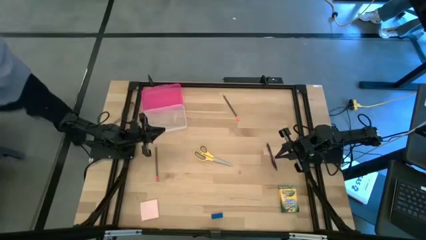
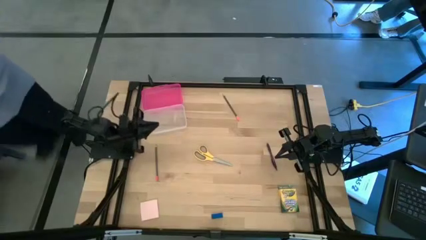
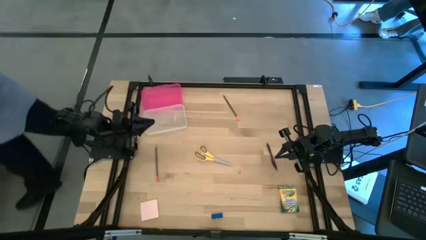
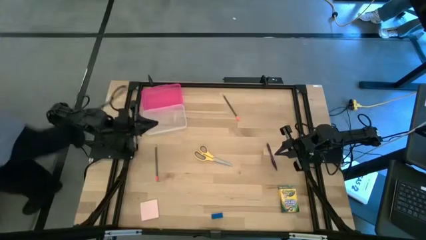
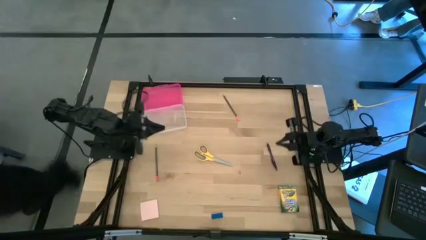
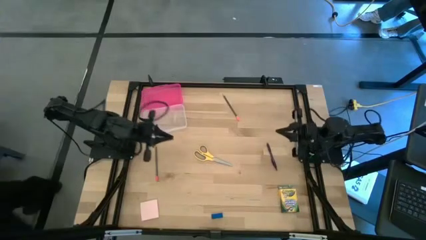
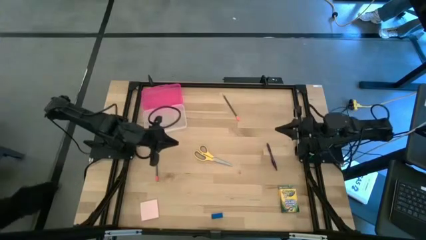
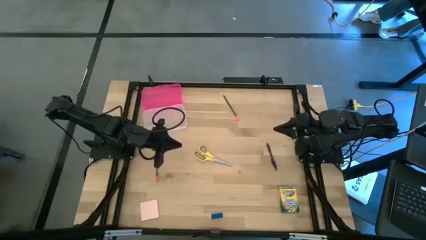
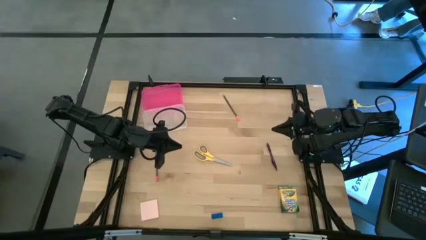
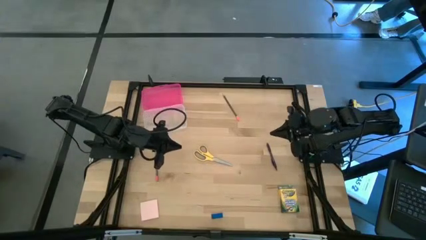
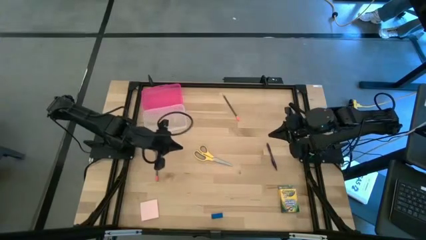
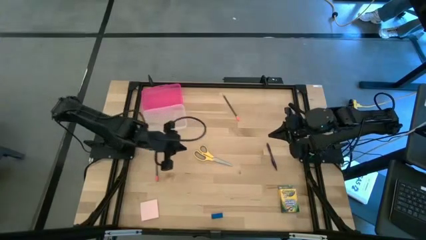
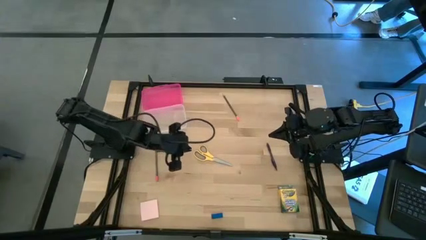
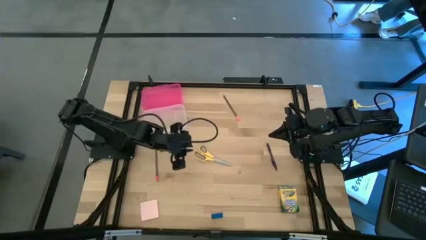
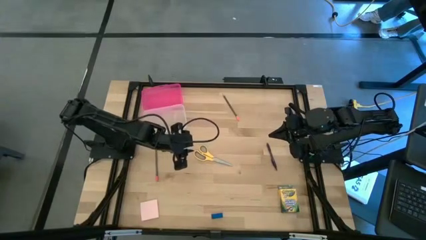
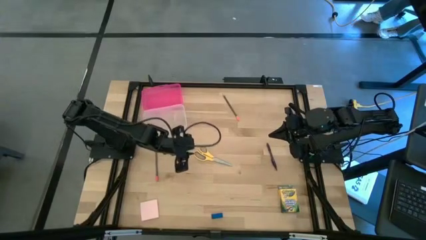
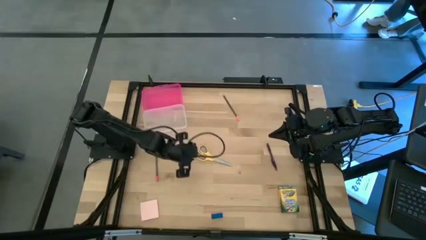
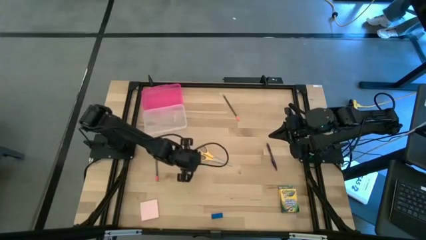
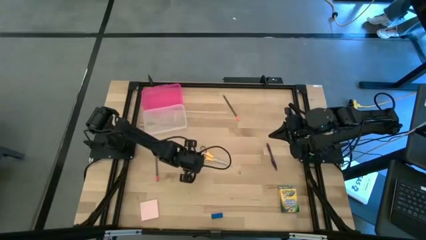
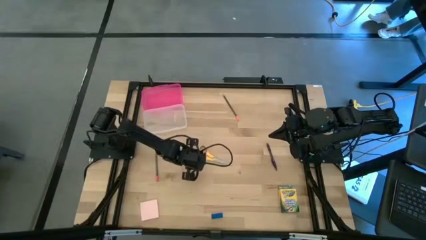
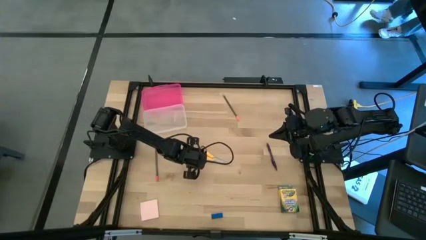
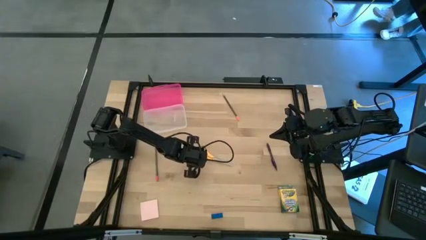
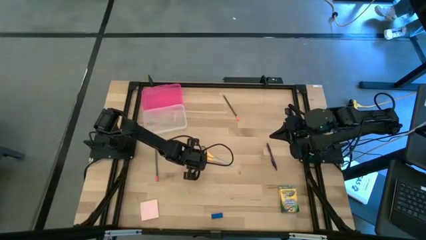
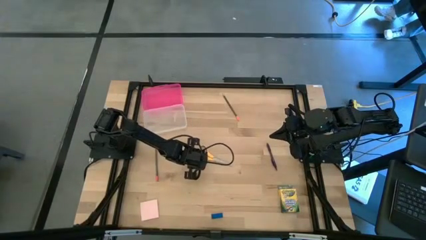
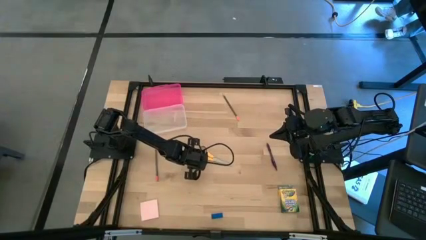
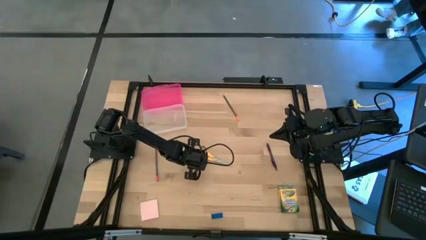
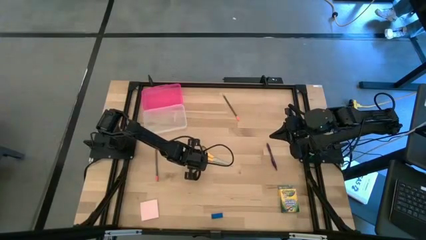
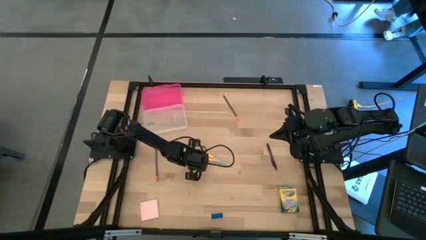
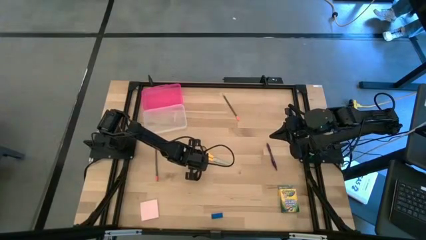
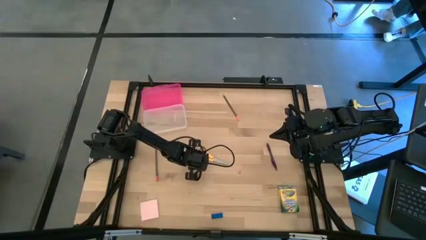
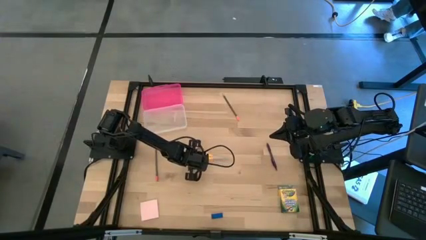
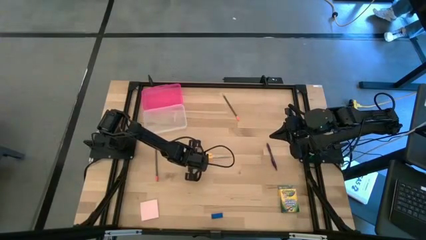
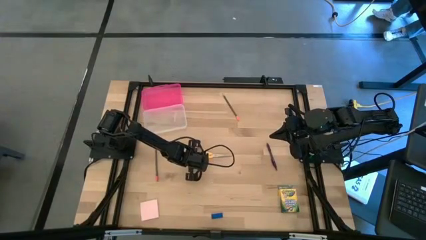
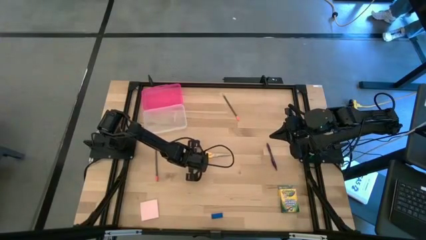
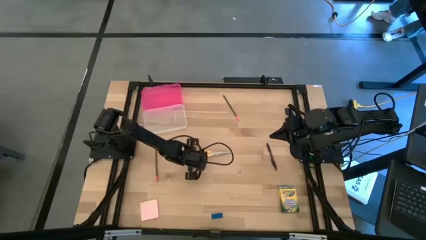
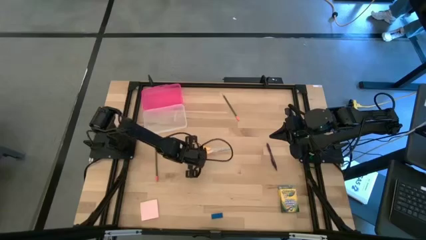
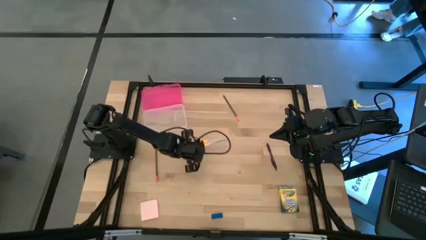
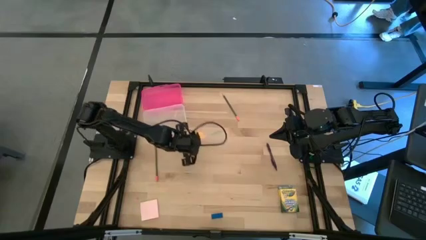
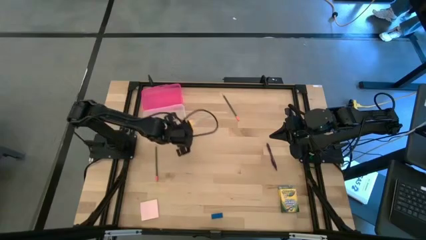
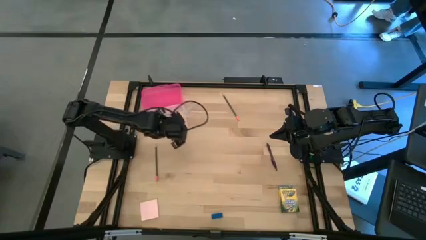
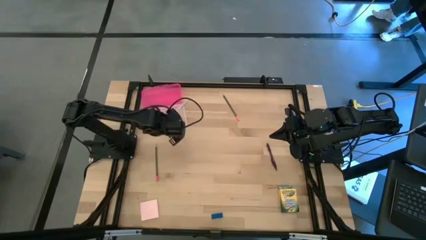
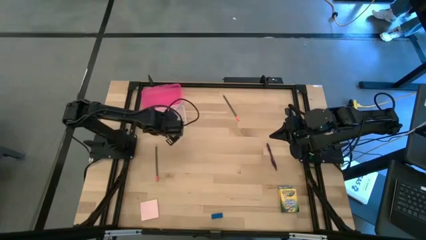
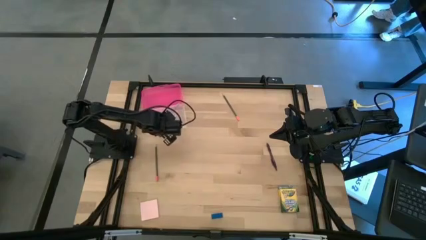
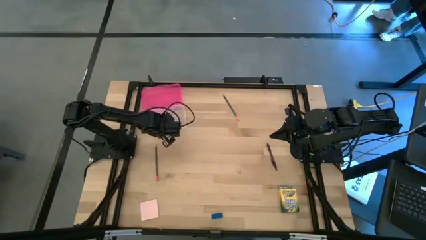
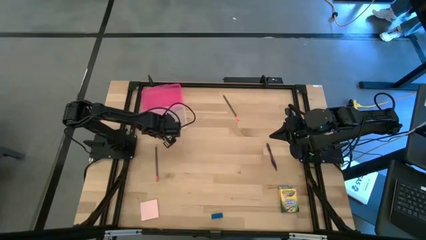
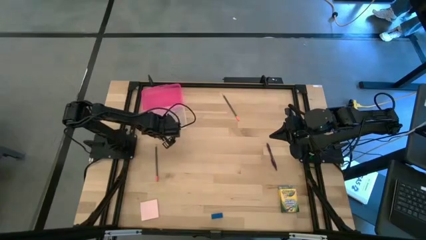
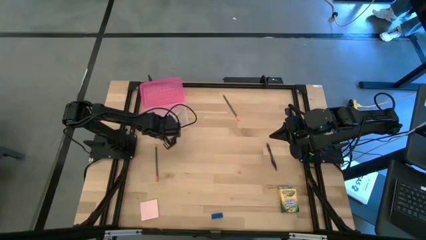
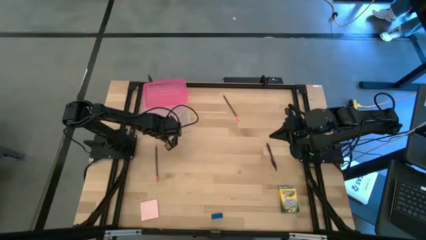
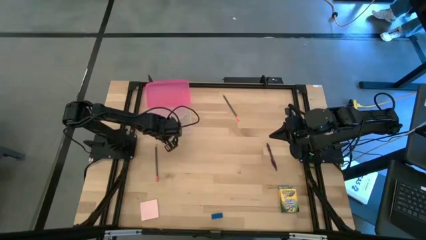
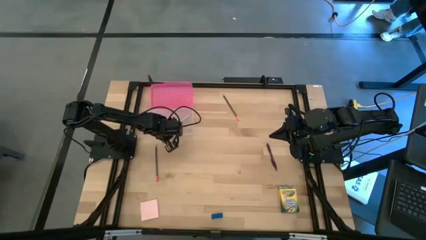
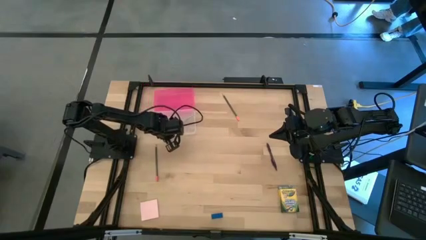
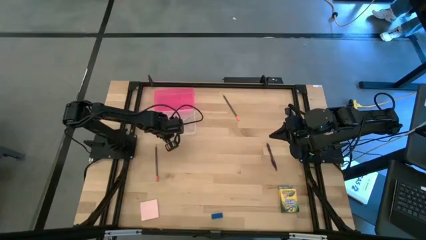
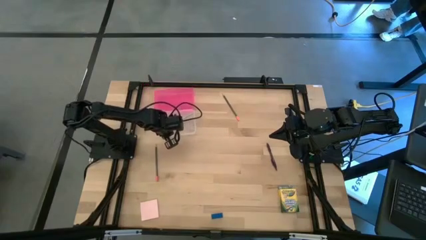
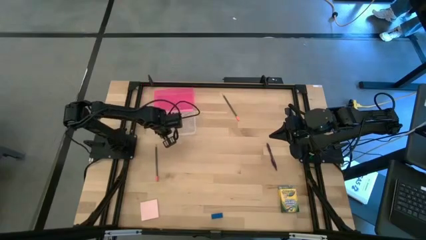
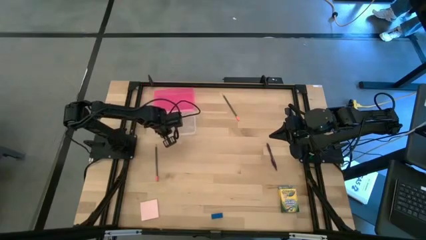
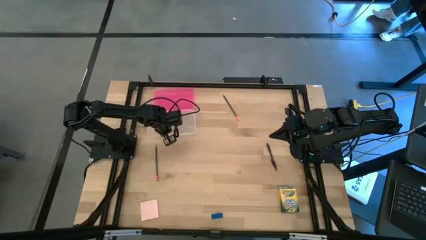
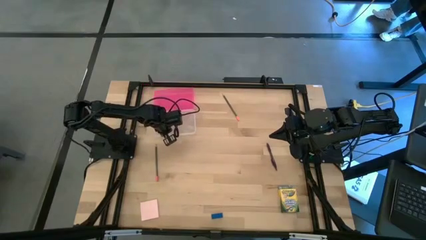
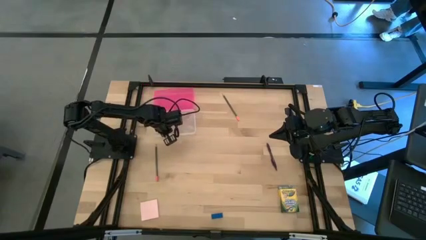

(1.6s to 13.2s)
Task: Pack school essentials
Put the yellow scissors into the pink supply box

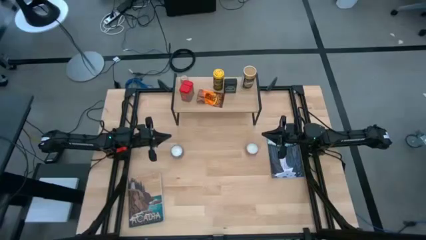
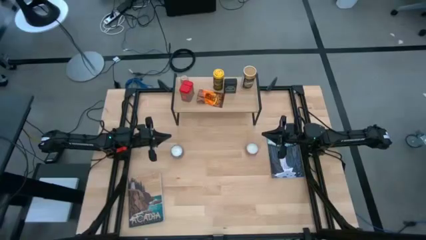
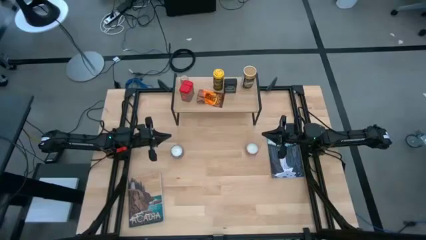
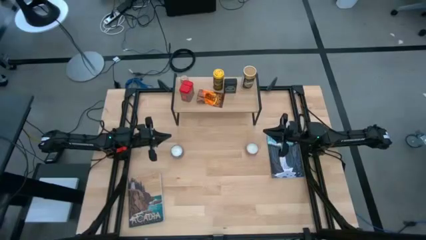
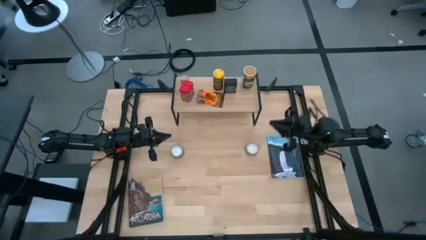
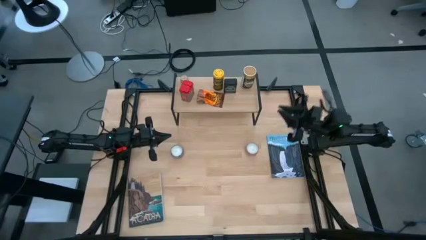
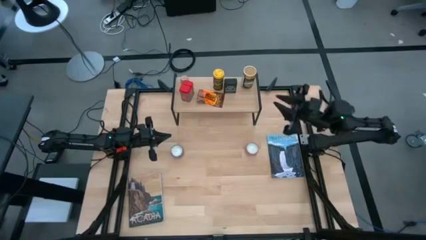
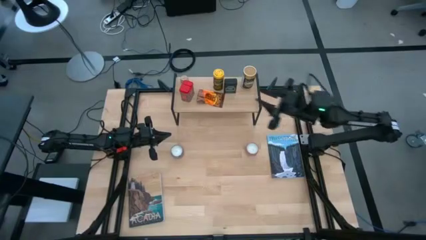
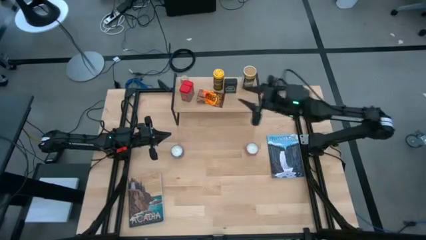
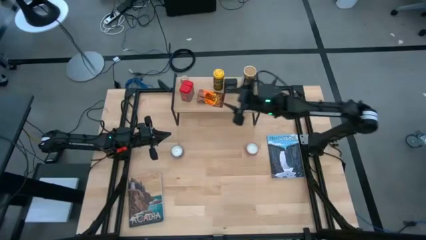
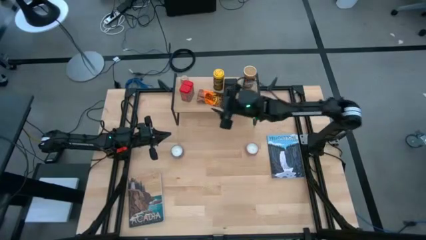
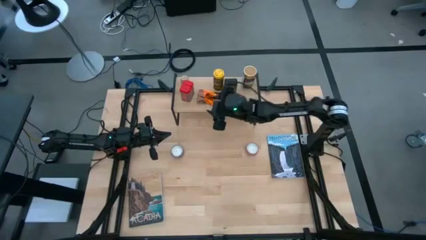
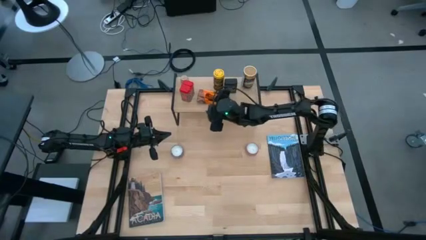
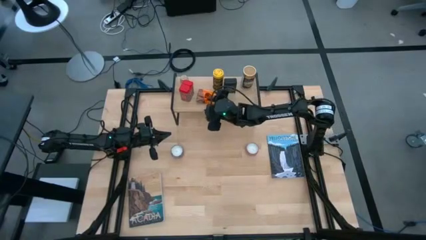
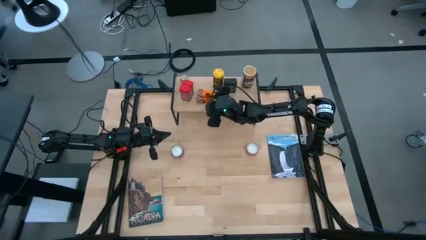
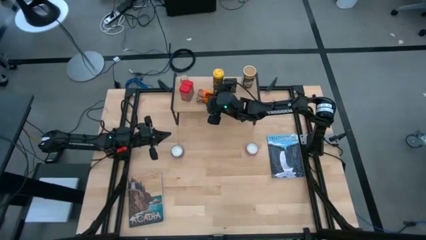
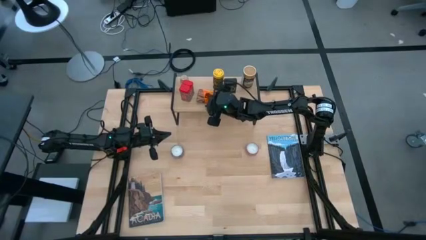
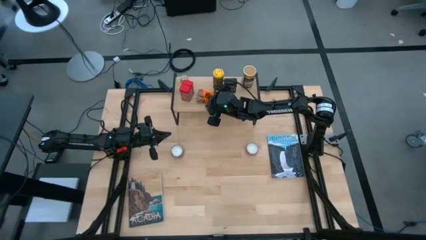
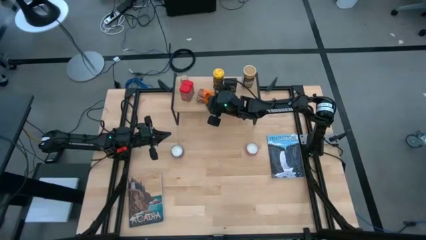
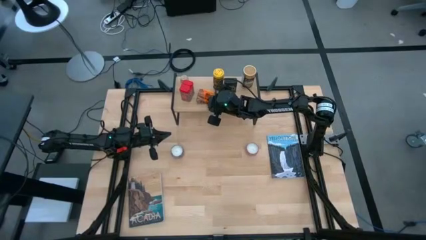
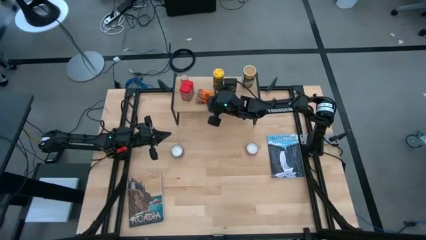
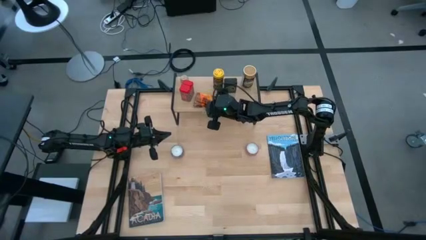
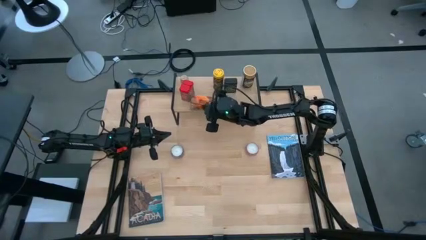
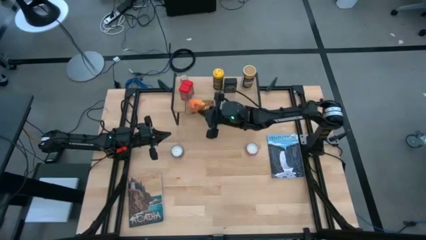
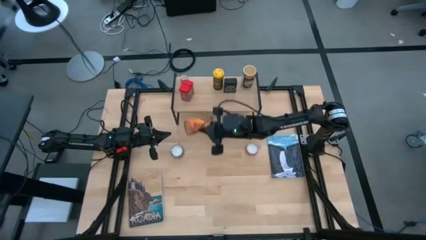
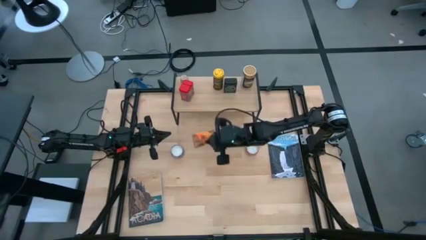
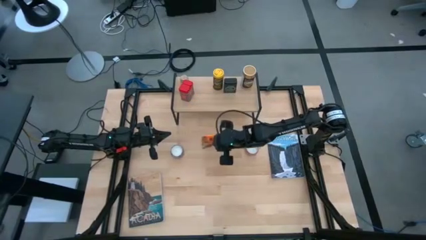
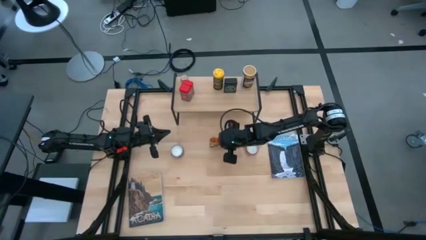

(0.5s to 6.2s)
Task: Shelf spices
Remove the orange seasoning pack from the shelf
